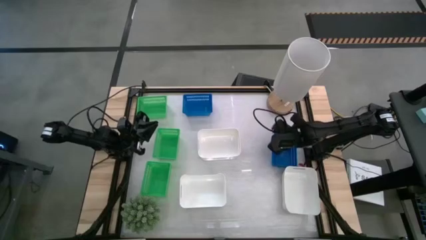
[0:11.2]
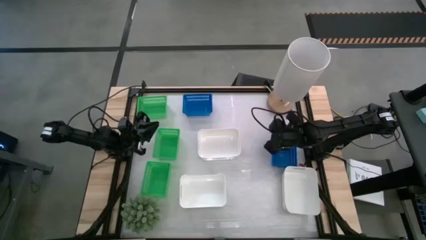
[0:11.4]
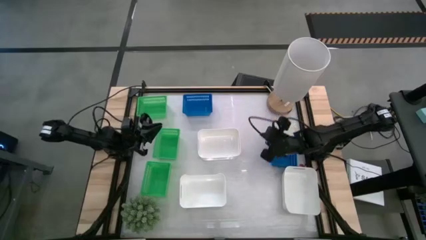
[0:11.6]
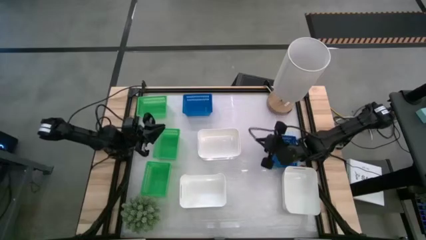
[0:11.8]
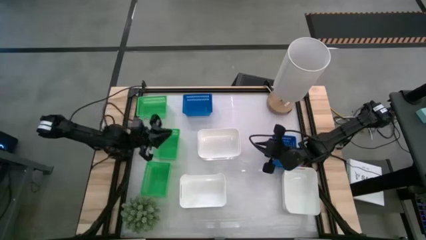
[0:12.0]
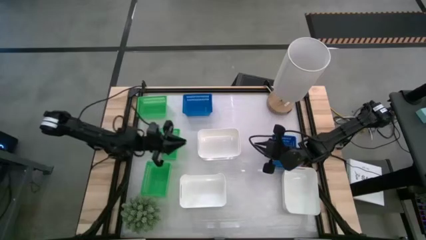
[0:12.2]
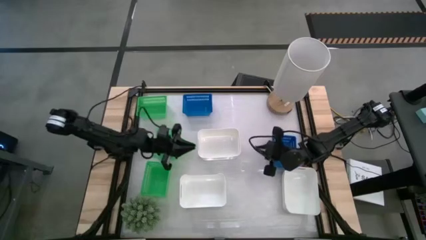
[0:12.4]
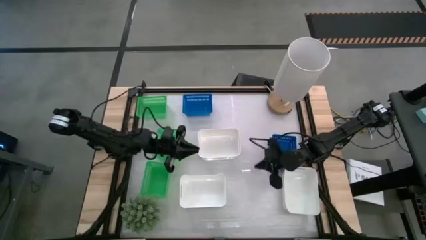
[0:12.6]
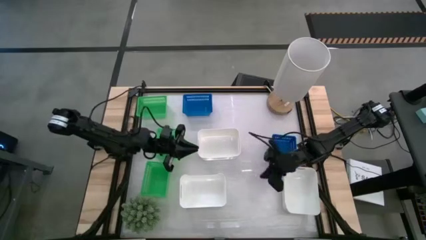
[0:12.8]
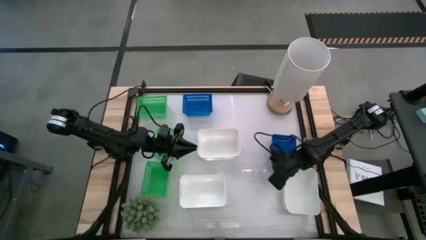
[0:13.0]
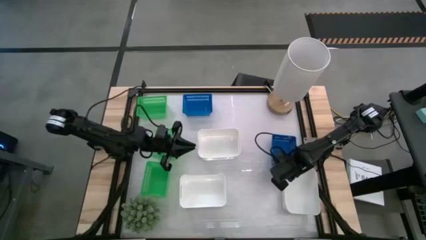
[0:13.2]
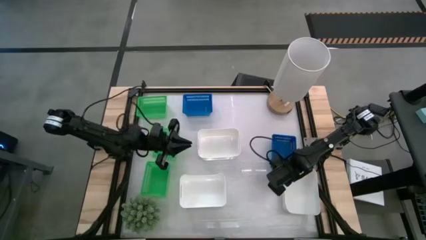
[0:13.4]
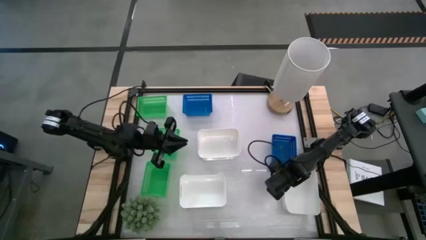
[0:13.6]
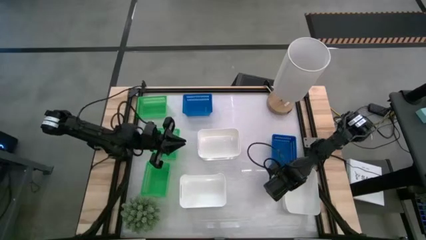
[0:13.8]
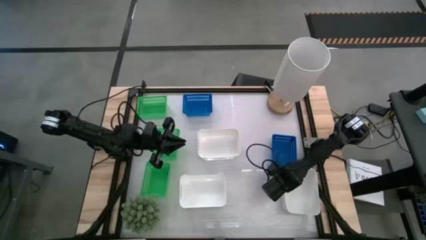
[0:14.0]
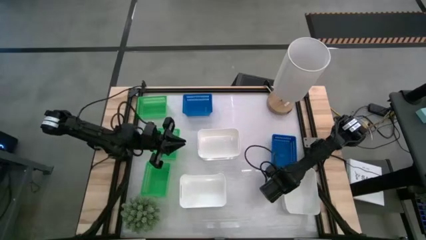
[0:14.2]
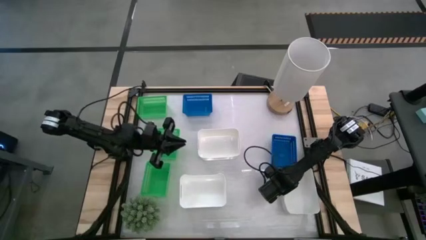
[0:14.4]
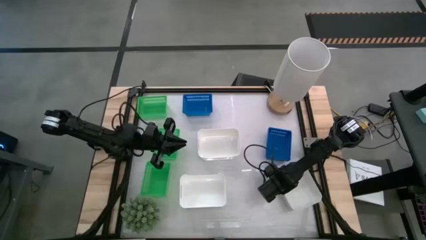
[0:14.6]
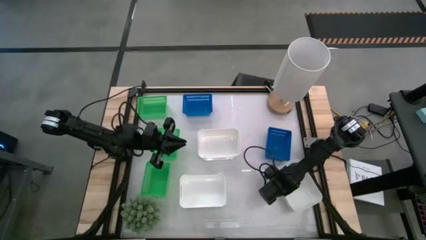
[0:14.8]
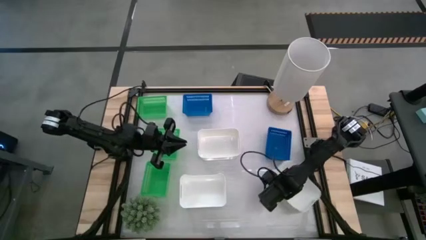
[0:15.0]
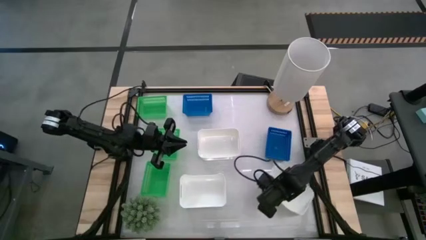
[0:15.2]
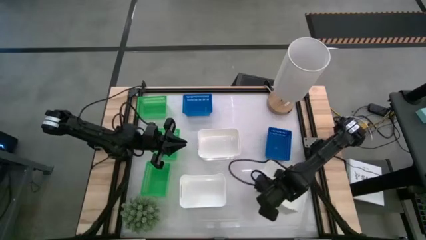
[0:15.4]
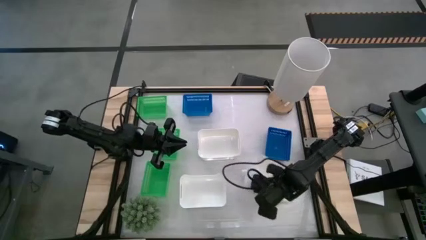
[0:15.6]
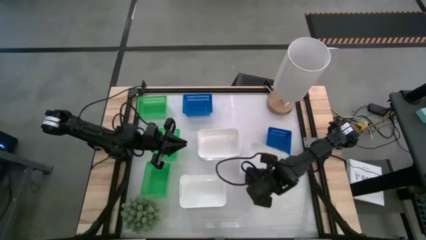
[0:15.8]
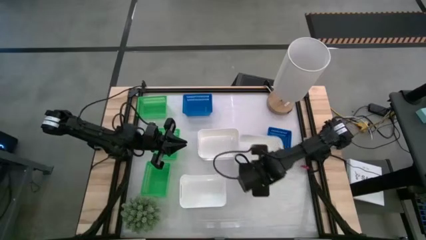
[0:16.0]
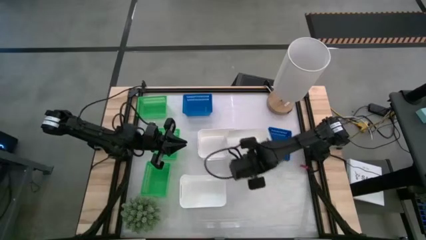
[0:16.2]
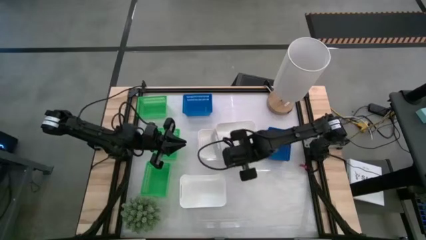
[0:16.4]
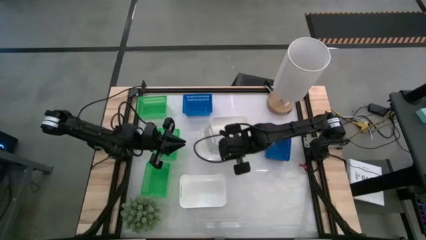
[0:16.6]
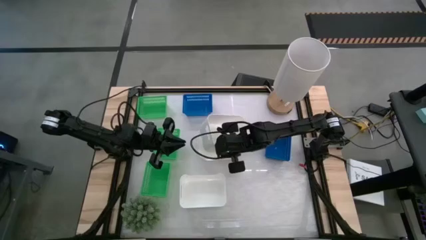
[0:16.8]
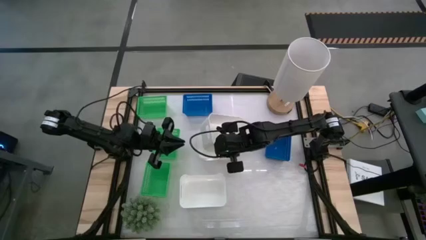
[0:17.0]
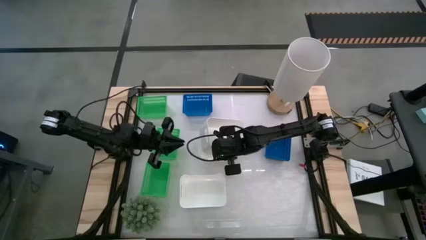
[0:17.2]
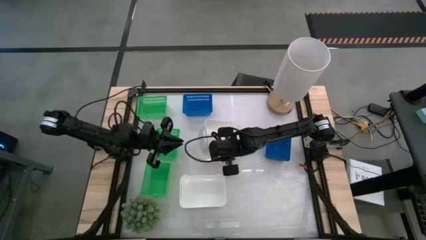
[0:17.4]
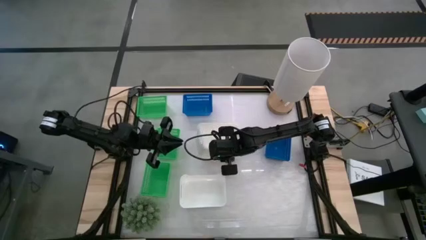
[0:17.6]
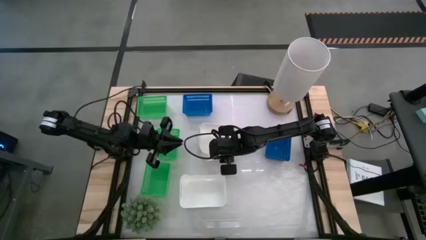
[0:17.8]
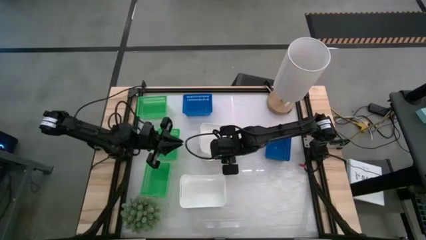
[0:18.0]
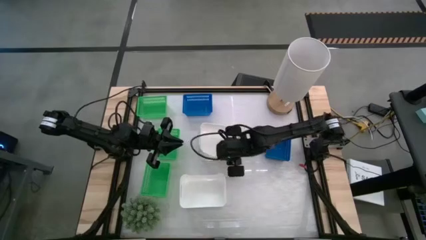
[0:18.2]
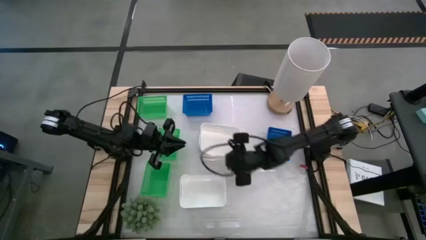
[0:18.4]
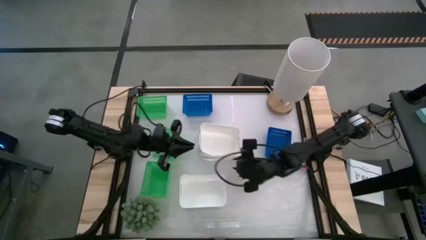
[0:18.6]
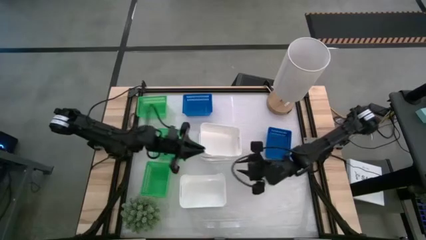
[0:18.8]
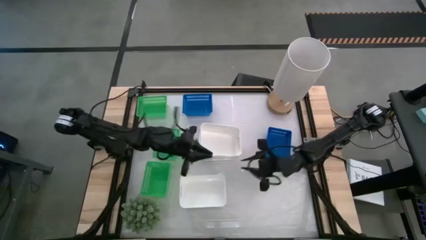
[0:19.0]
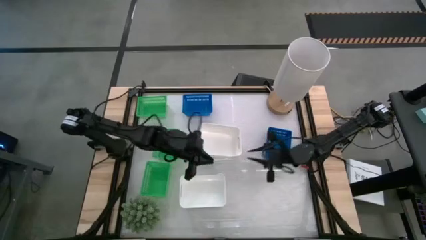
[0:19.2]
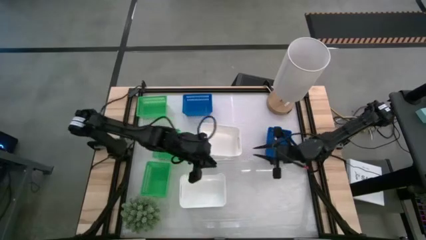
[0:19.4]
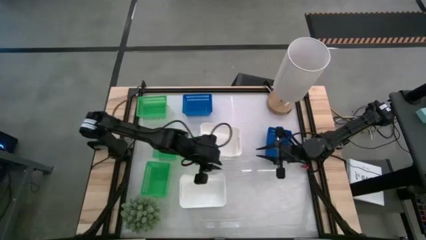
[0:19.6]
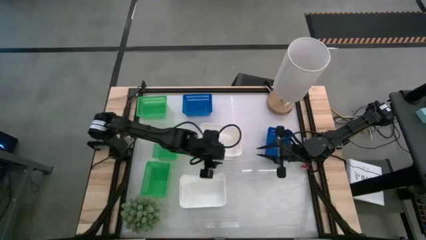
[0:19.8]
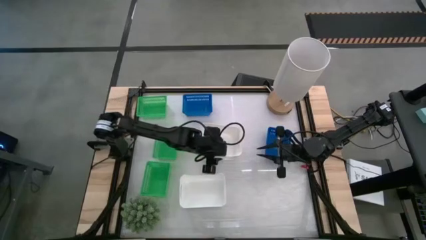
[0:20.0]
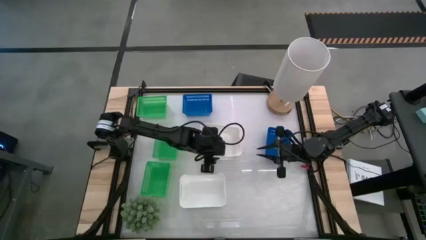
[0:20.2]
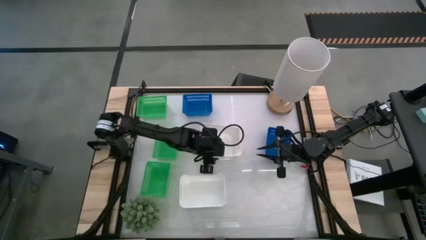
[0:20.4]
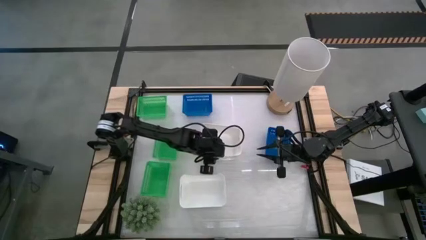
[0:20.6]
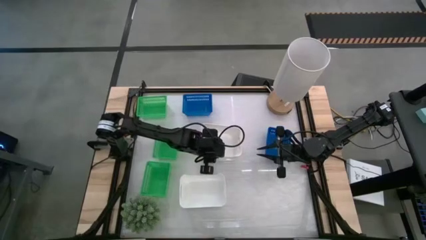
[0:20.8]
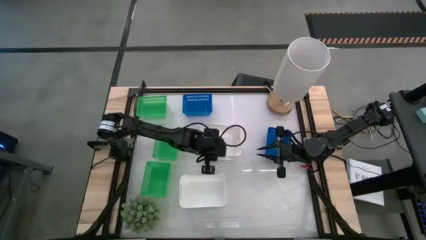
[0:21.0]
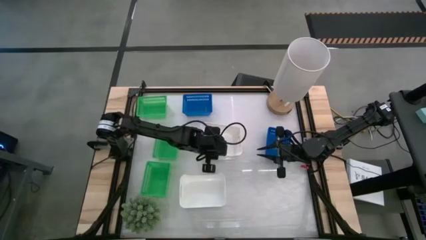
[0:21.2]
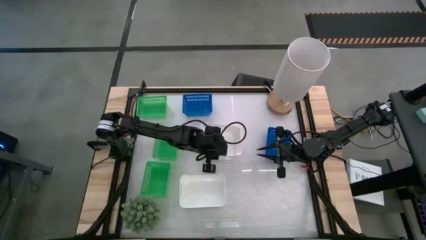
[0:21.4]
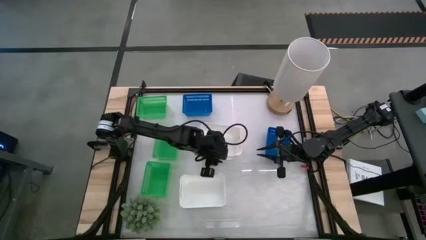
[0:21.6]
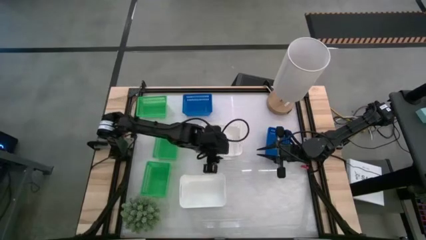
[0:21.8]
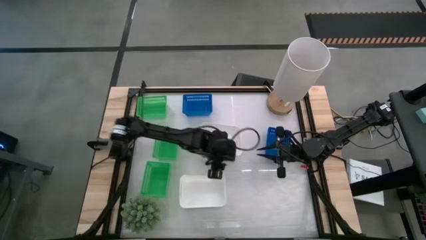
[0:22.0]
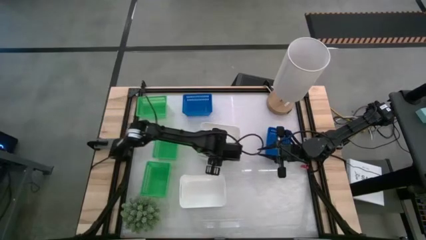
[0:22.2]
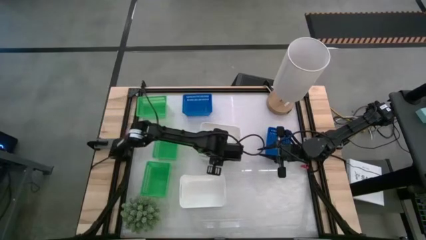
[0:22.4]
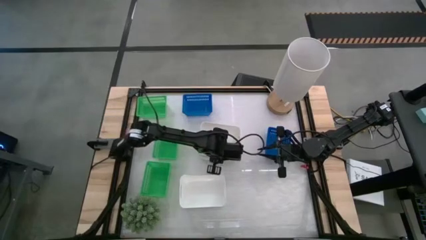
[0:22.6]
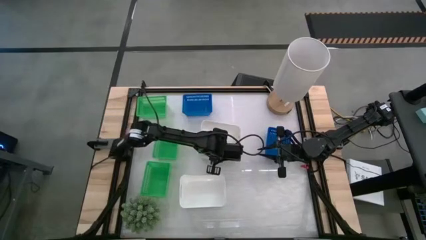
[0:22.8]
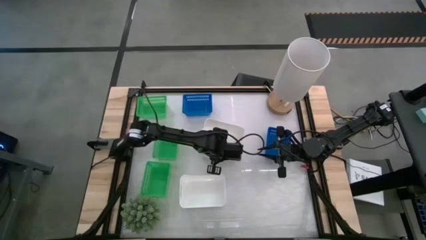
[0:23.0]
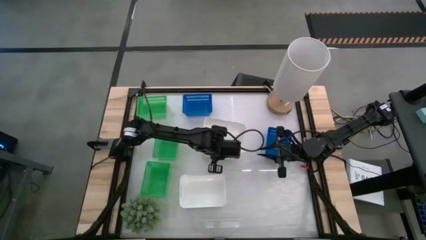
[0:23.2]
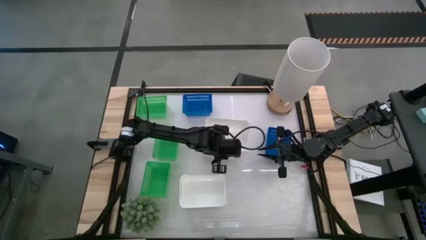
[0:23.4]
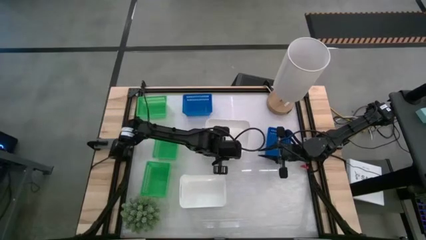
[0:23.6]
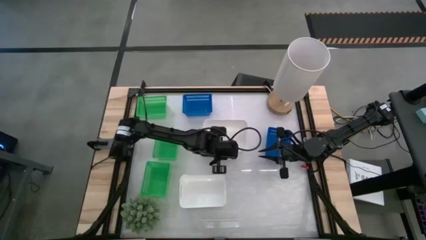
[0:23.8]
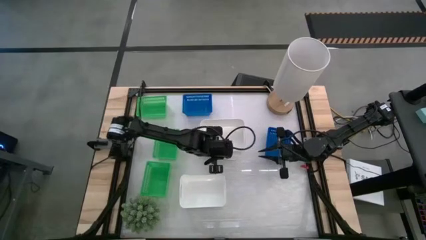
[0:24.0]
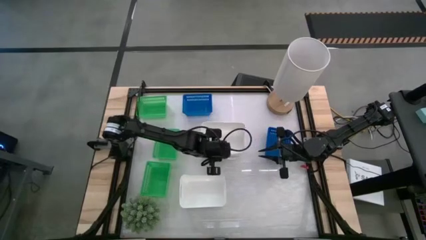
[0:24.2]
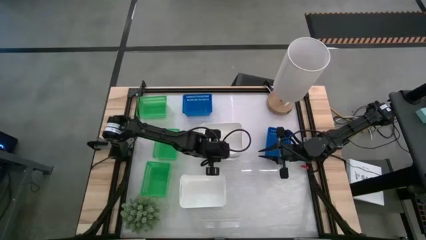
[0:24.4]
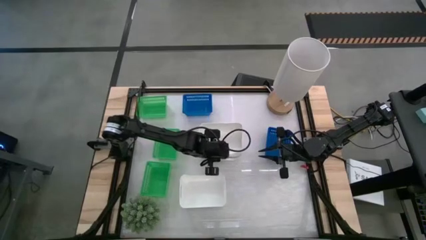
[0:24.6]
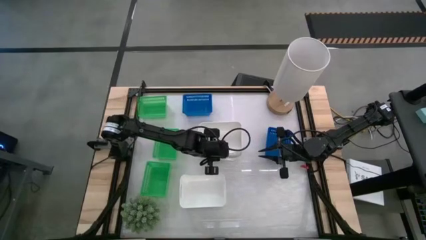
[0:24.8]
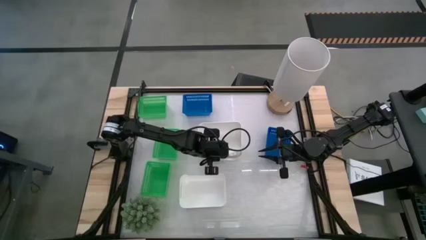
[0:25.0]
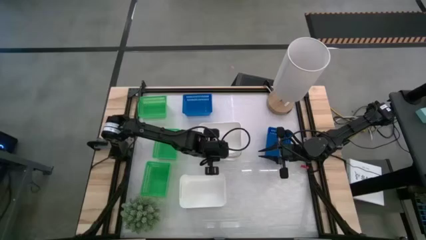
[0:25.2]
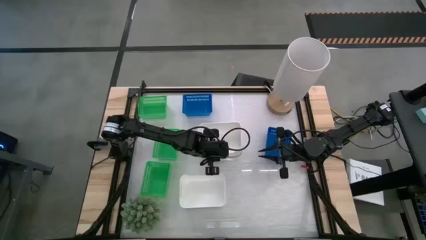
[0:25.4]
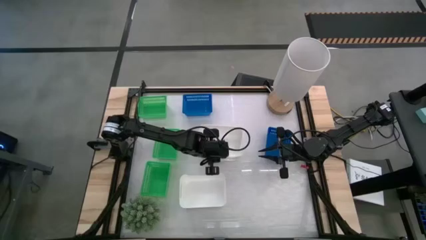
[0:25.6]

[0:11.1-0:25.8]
Stack the bottom right white bin on the top white bin
